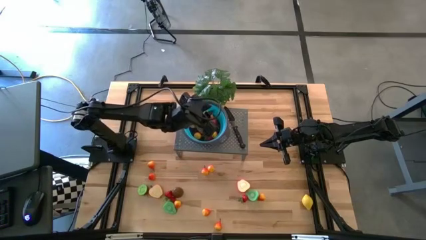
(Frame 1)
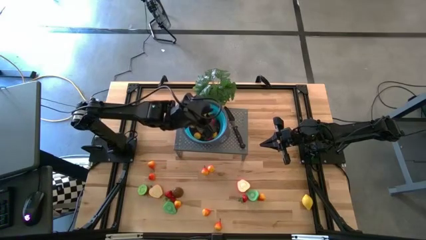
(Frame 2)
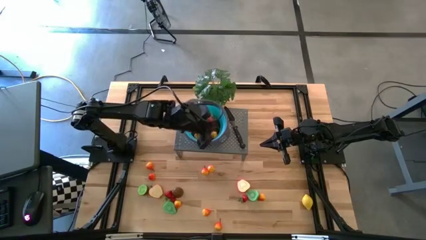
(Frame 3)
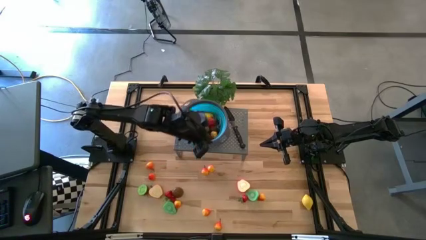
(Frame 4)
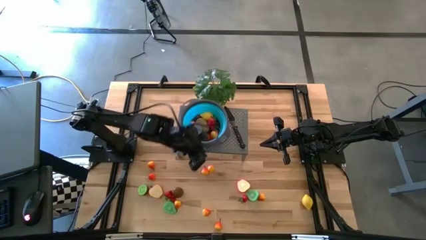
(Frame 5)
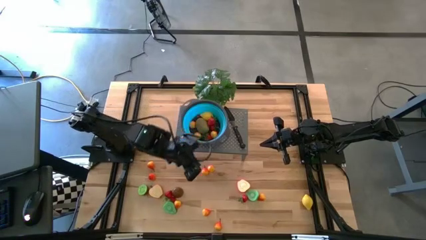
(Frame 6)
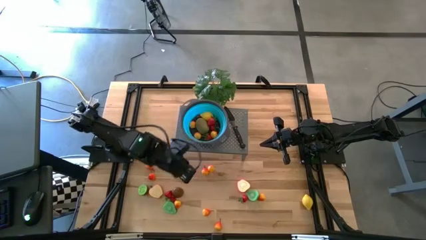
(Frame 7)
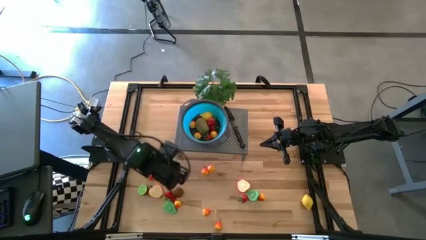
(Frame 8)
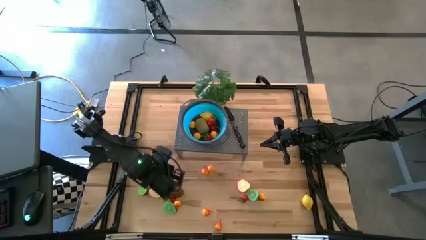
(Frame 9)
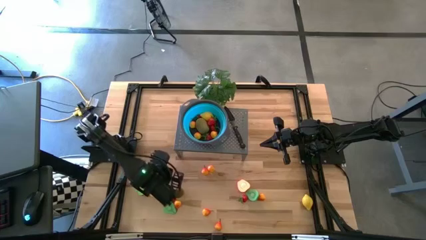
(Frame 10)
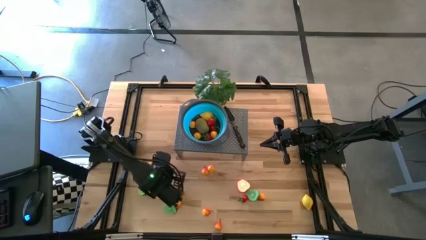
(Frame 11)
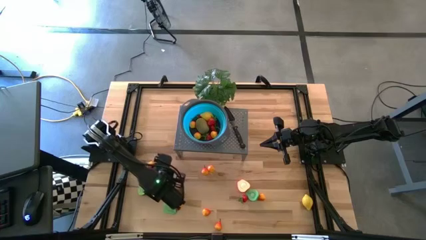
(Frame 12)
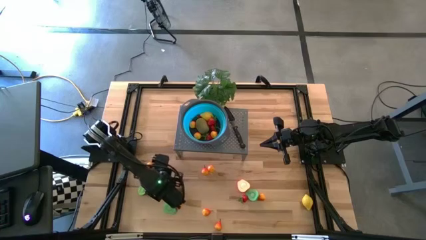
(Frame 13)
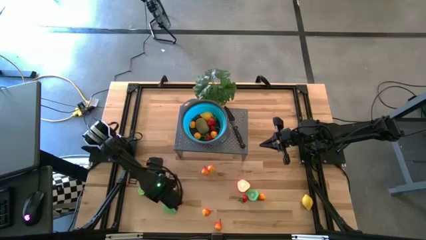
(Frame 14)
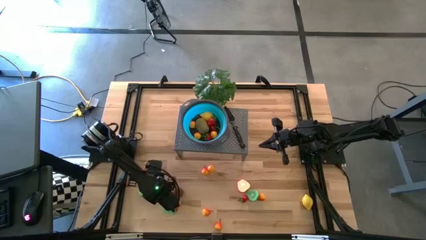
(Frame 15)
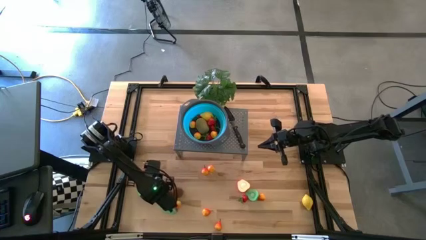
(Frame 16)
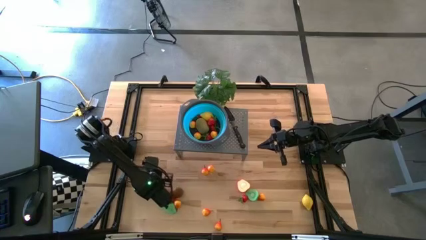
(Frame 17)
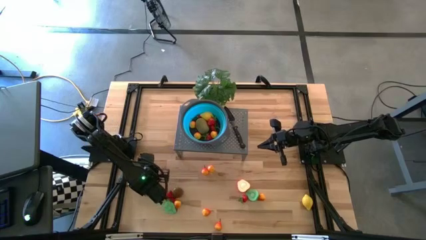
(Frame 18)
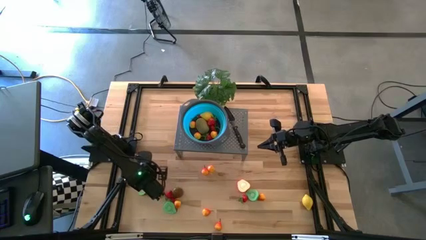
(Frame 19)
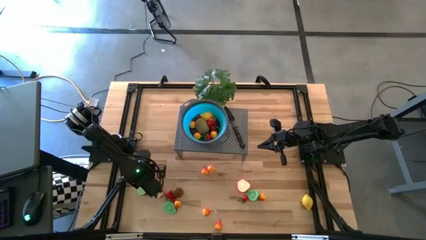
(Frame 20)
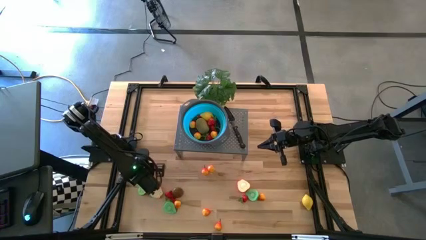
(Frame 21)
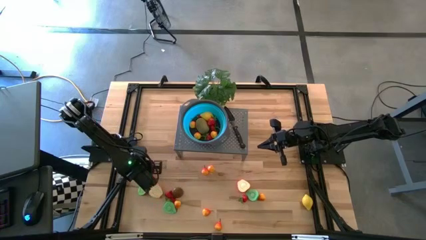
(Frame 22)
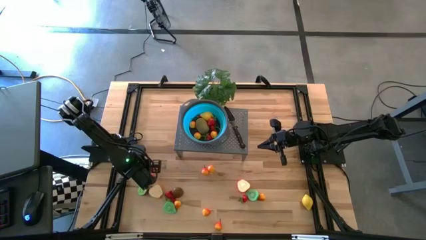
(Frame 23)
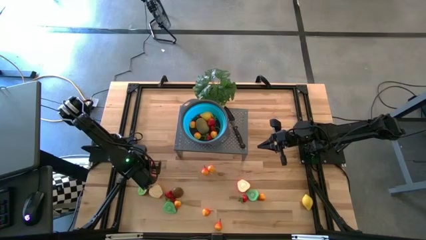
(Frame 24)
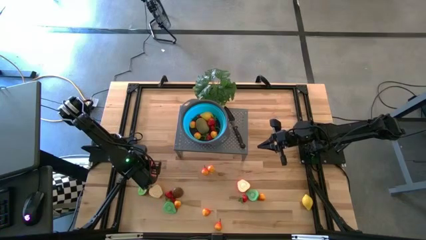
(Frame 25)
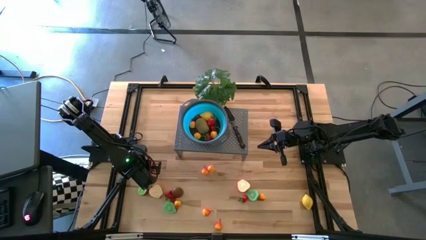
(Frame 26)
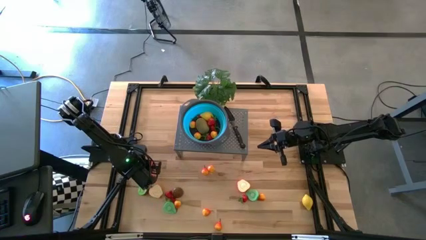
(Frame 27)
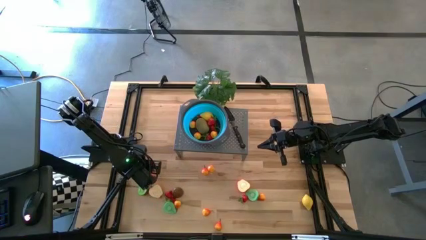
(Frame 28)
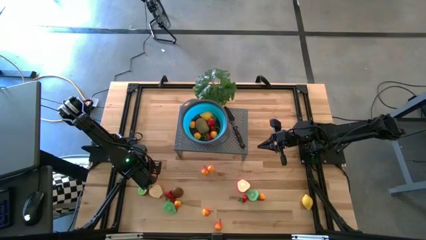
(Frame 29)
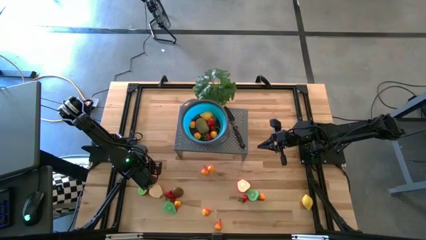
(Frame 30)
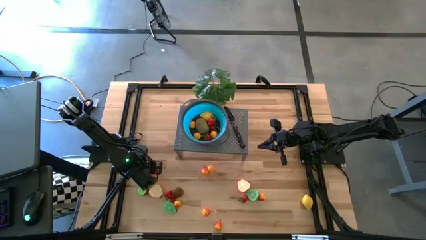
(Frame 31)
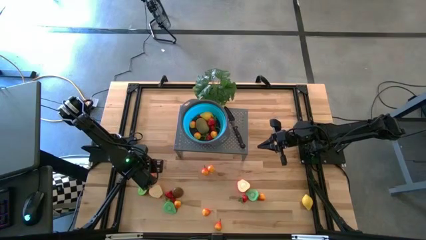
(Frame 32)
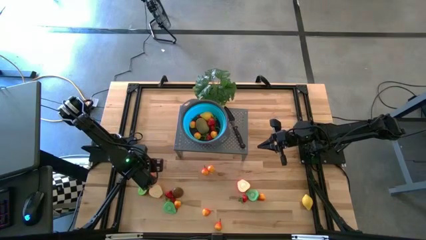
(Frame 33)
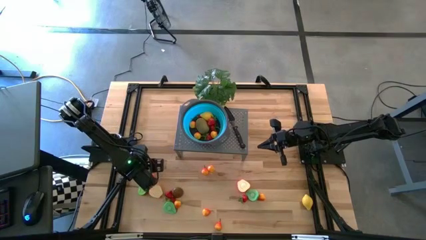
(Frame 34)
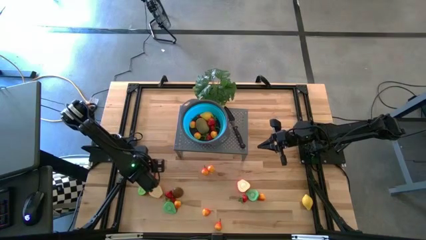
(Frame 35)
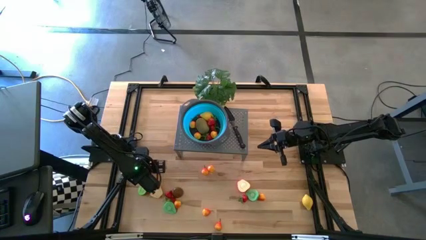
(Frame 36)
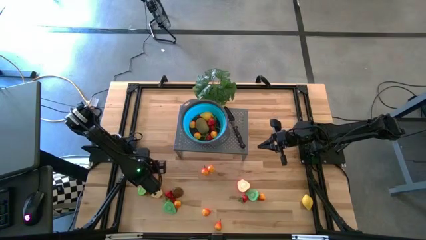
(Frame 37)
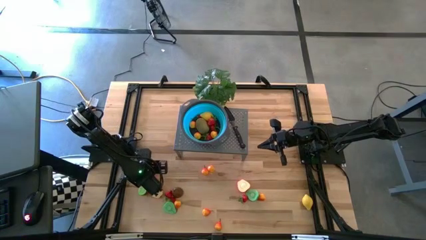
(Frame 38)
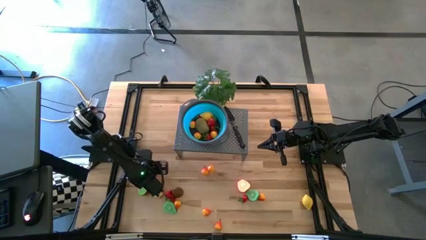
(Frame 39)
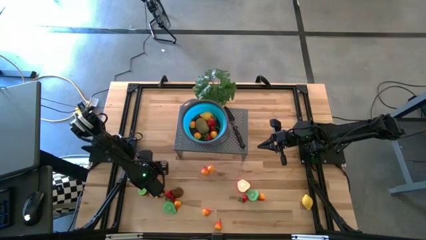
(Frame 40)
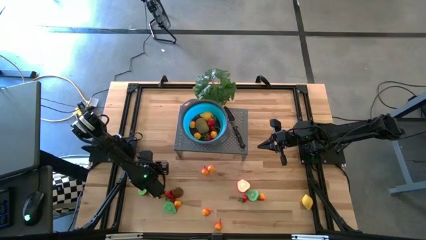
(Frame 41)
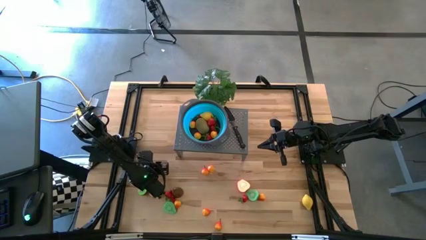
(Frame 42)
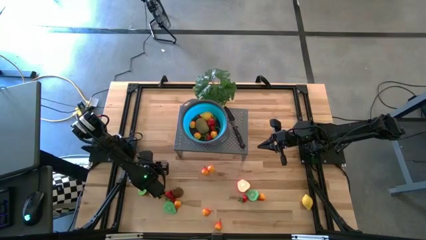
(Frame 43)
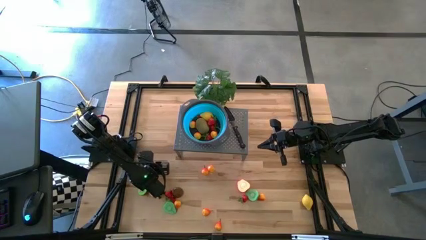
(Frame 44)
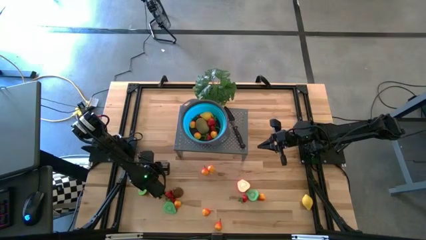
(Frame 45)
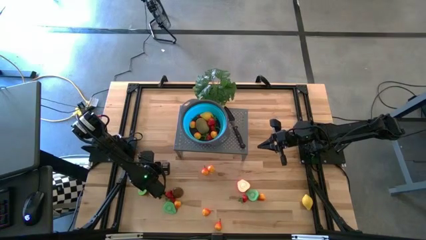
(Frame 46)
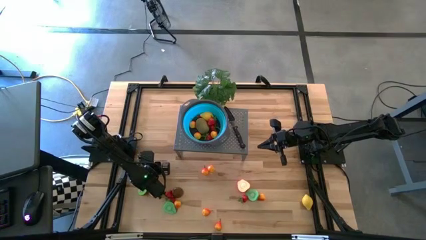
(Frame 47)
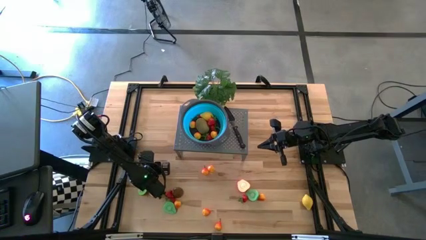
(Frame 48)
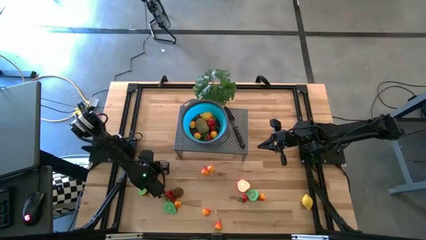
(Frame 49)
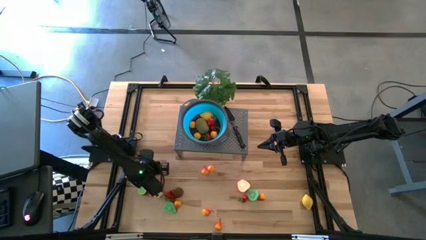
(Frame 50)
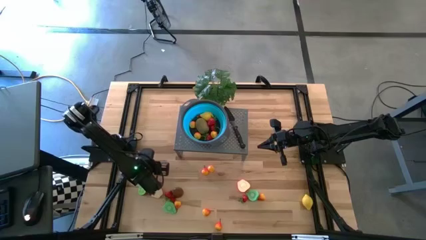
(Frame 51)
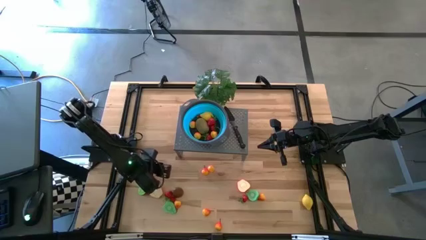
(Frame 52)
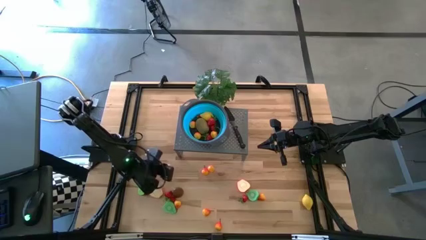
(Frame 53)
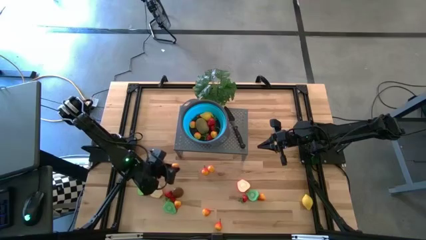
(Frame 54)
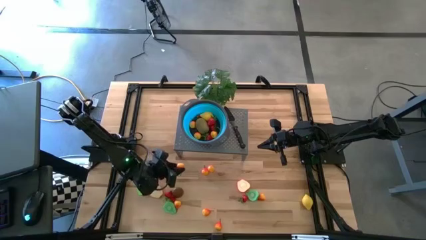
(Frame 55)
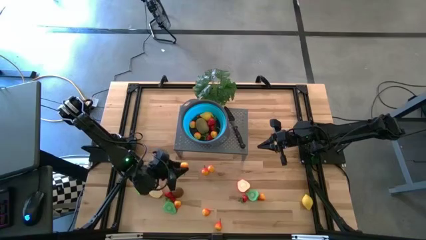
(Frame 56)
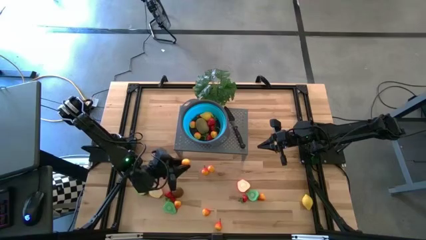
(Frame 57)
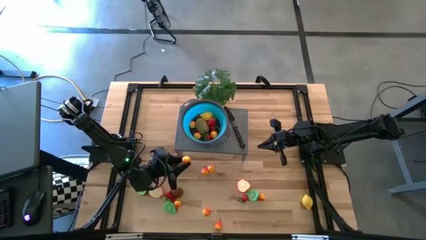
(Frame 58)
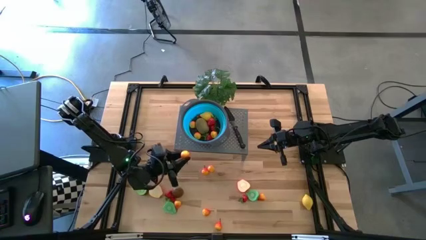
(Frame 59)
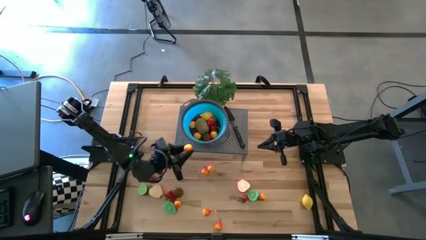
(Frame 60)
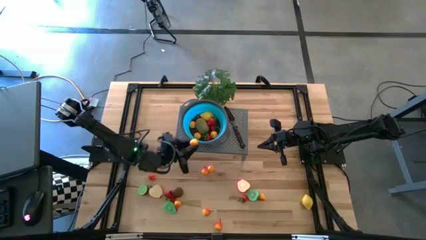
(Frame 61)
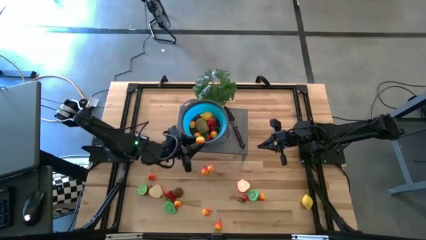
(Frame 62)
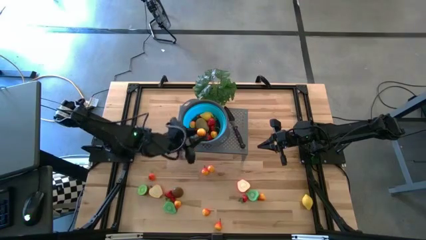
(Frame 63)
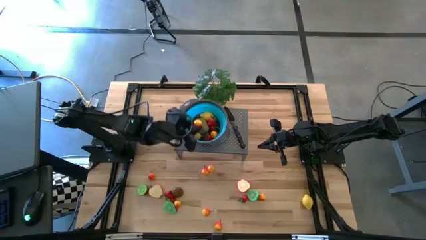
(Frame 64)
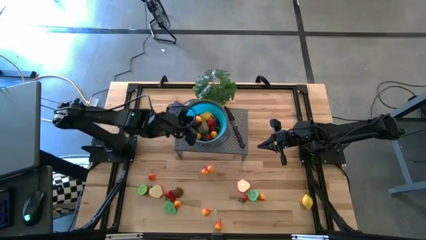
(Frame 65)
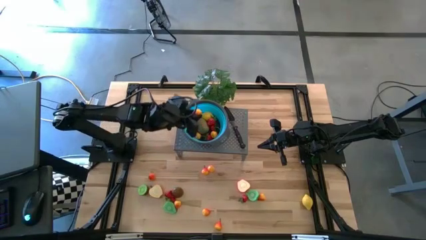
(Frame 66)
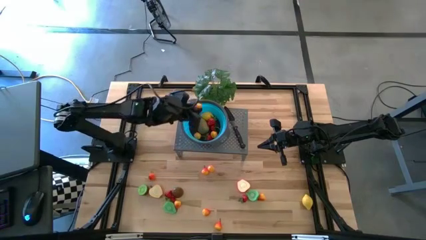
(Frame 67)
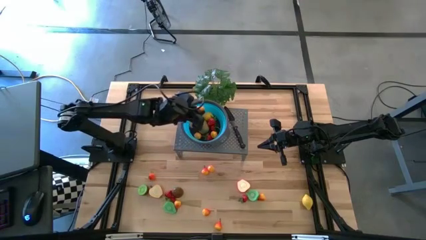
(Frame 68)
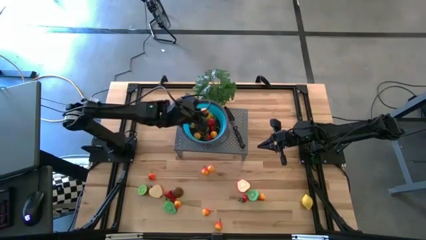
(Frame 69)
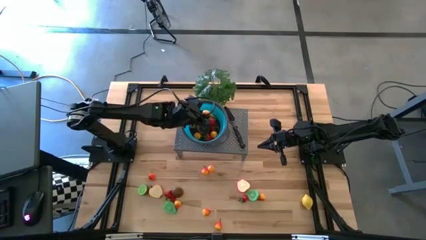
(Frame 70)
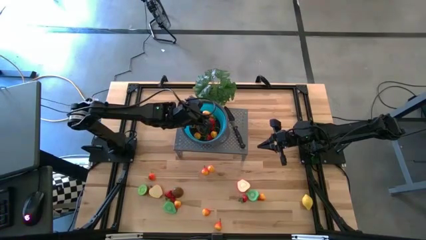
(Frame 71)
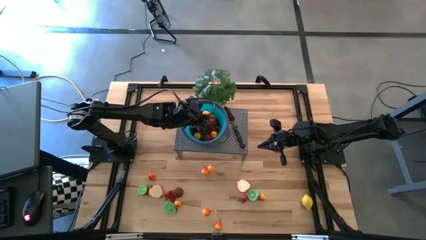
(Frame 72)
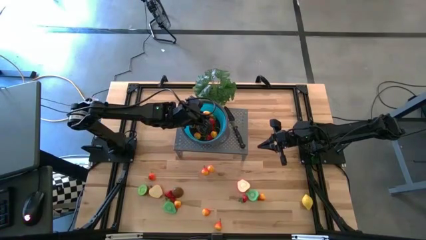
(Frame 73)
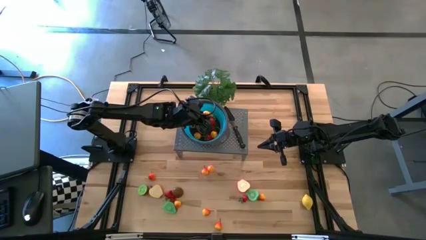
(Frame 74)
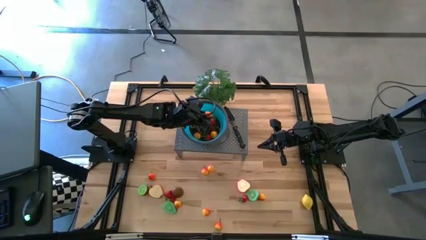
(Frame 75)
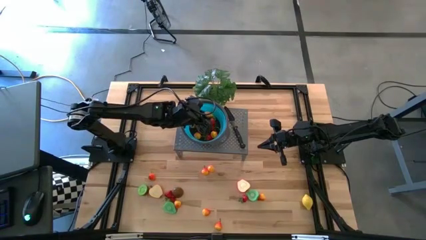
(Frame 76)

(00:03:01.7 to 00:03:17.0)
Task: Pick & Place Fruit
Put the pear into the blue strainer bowl on the shelf
